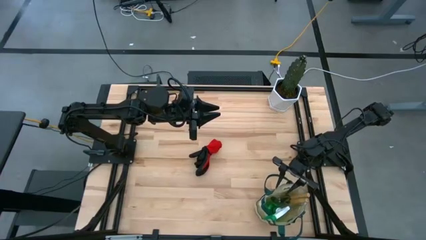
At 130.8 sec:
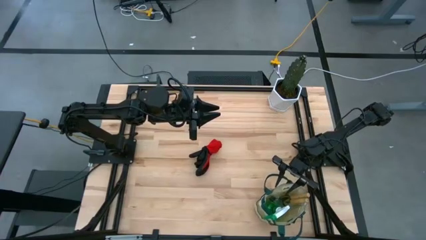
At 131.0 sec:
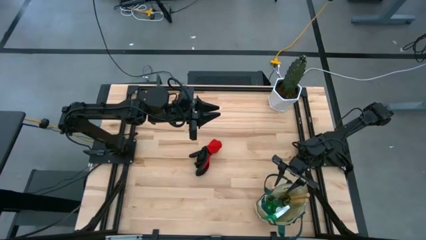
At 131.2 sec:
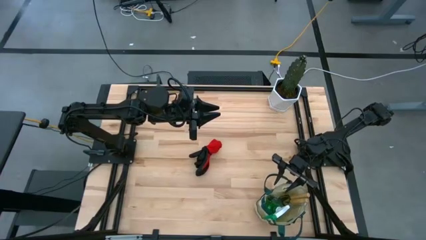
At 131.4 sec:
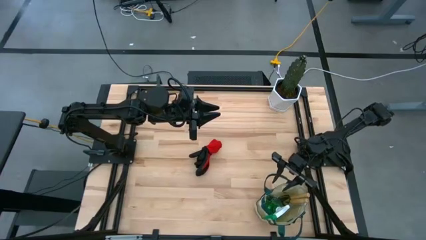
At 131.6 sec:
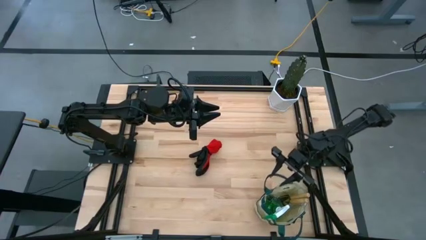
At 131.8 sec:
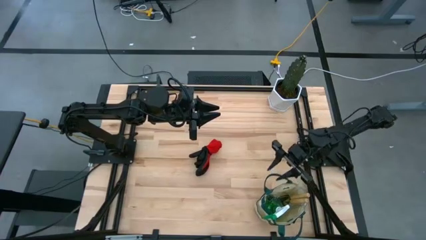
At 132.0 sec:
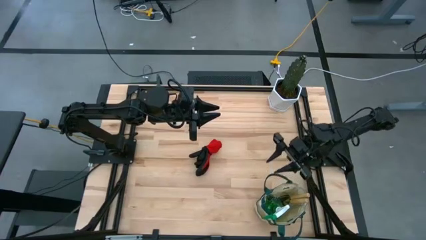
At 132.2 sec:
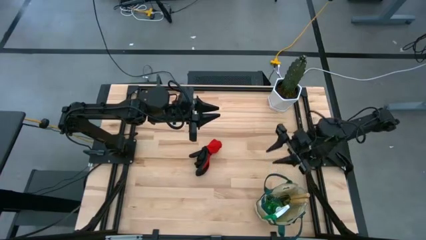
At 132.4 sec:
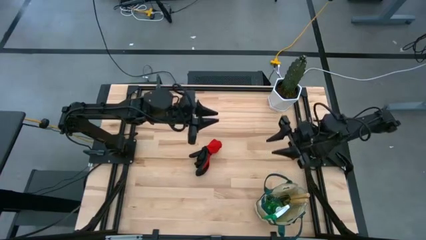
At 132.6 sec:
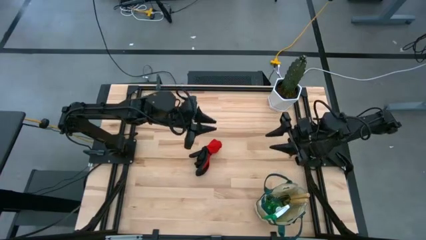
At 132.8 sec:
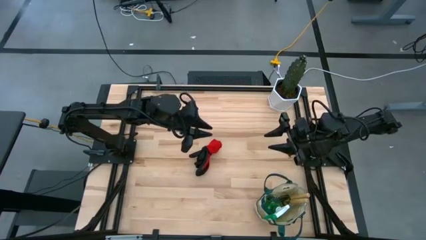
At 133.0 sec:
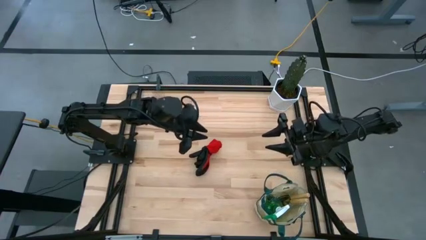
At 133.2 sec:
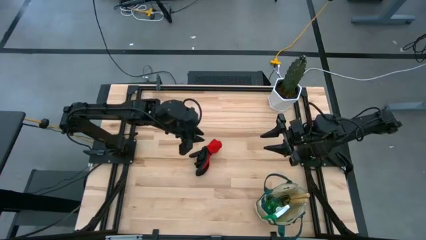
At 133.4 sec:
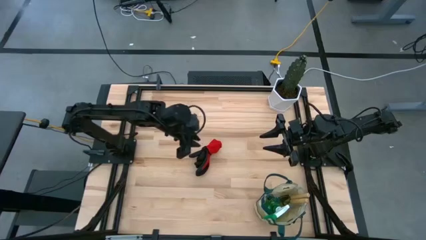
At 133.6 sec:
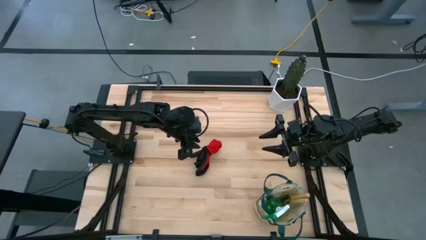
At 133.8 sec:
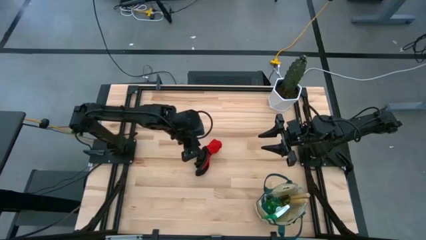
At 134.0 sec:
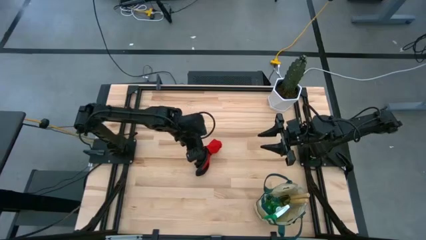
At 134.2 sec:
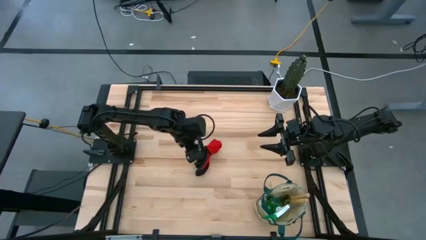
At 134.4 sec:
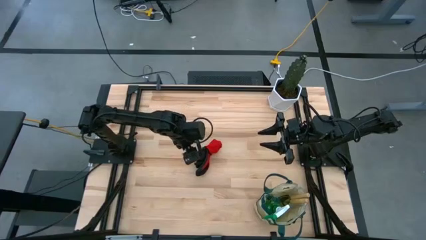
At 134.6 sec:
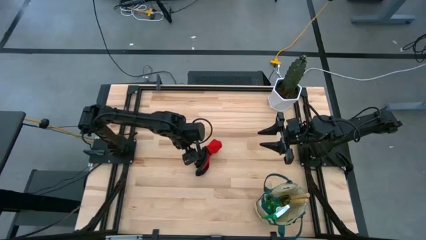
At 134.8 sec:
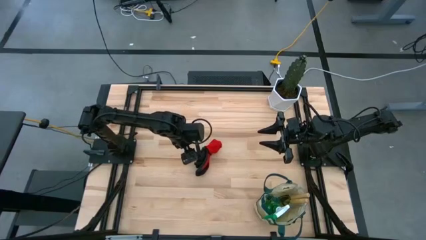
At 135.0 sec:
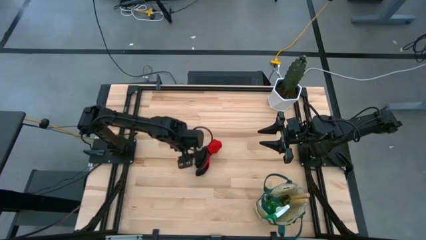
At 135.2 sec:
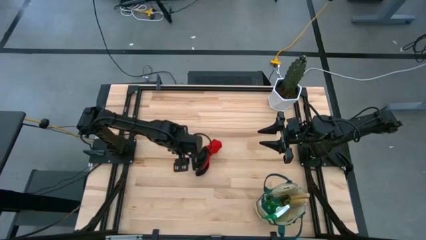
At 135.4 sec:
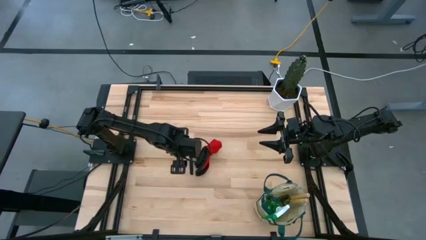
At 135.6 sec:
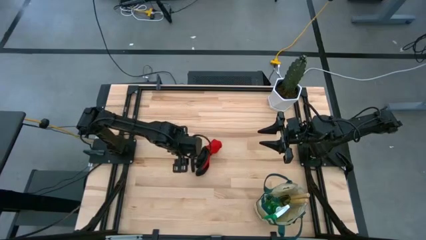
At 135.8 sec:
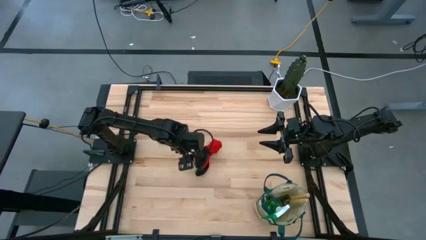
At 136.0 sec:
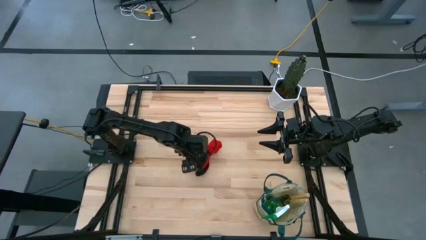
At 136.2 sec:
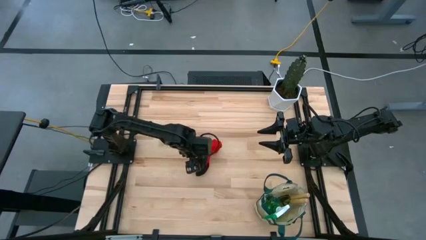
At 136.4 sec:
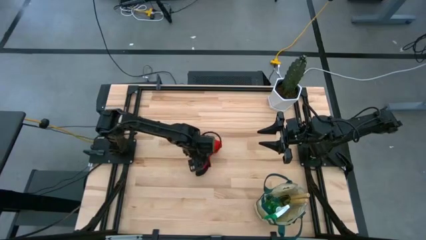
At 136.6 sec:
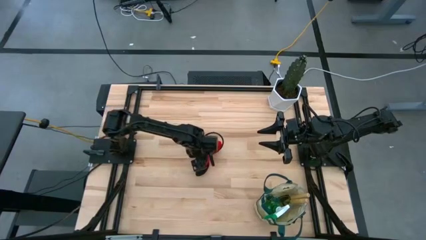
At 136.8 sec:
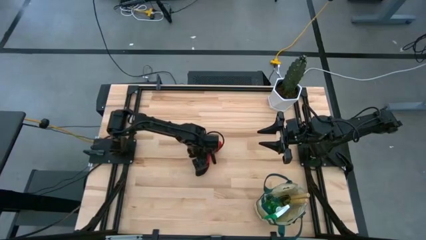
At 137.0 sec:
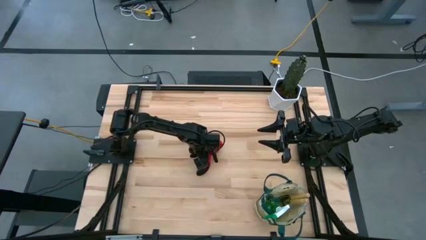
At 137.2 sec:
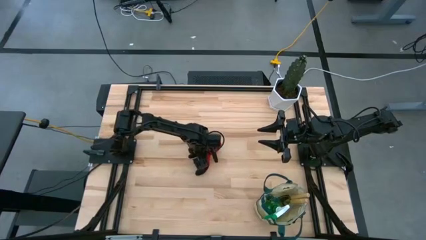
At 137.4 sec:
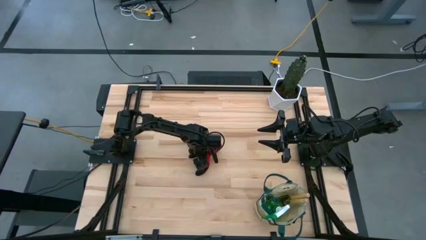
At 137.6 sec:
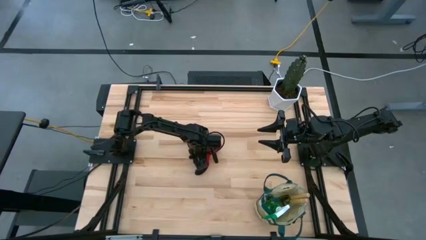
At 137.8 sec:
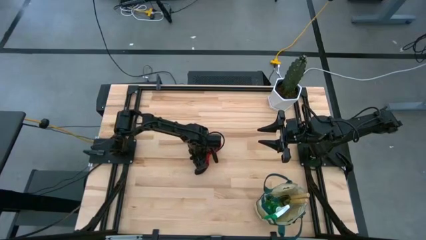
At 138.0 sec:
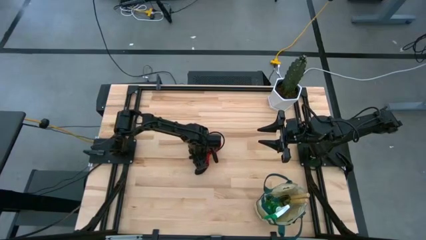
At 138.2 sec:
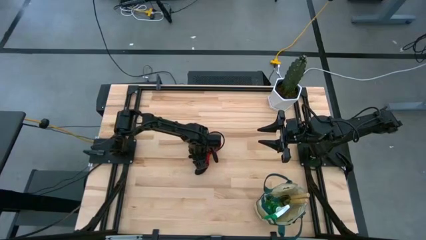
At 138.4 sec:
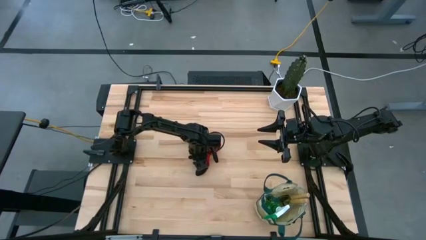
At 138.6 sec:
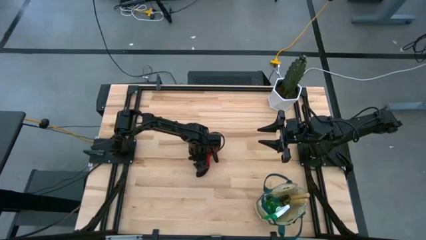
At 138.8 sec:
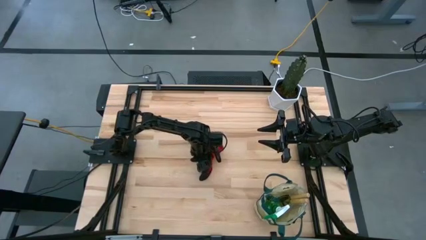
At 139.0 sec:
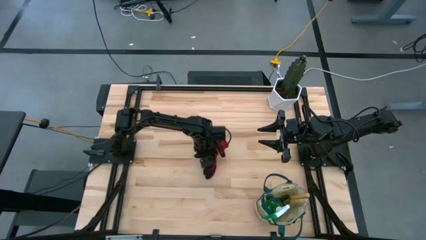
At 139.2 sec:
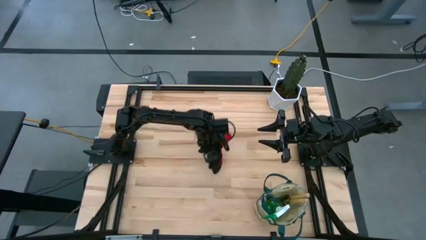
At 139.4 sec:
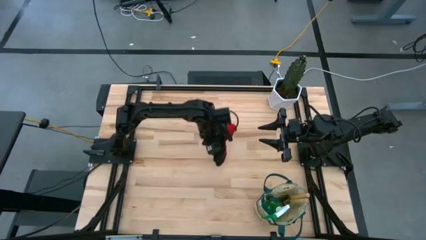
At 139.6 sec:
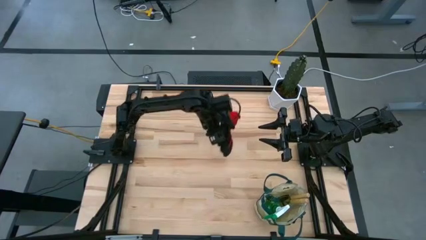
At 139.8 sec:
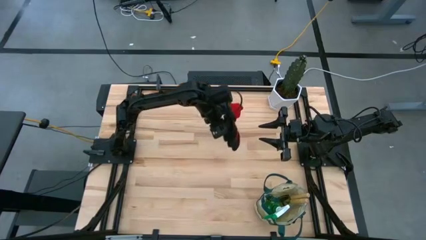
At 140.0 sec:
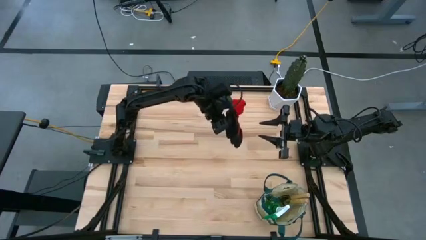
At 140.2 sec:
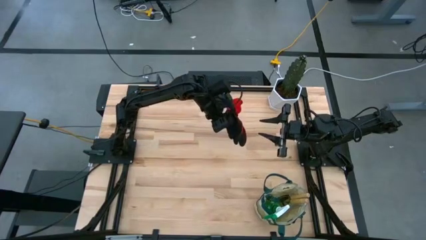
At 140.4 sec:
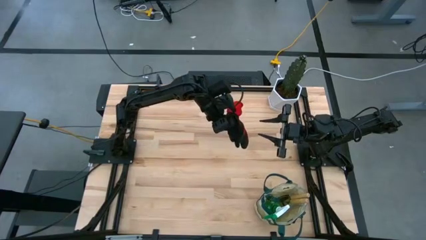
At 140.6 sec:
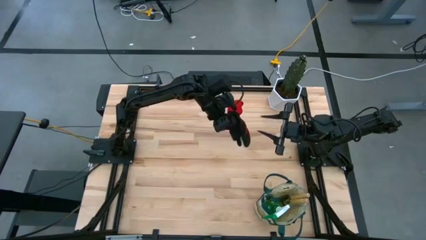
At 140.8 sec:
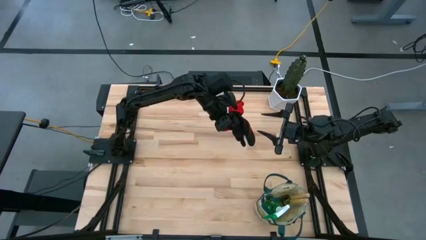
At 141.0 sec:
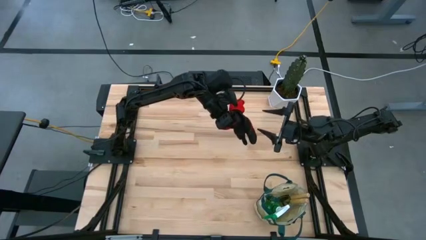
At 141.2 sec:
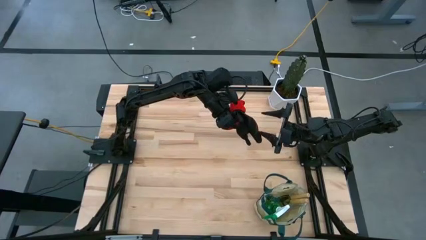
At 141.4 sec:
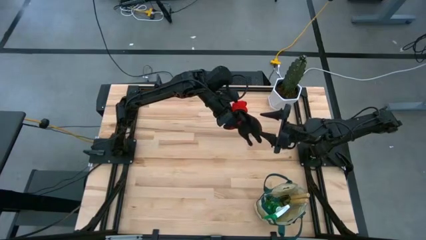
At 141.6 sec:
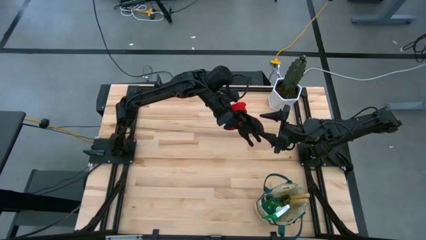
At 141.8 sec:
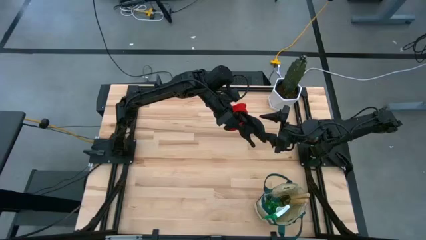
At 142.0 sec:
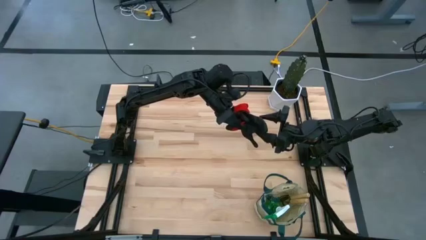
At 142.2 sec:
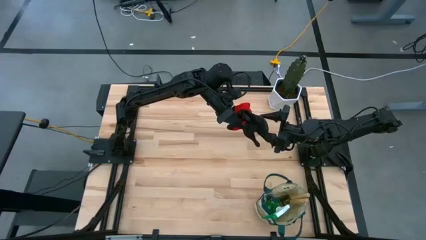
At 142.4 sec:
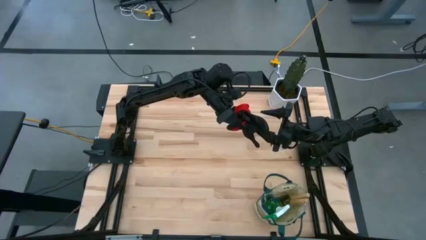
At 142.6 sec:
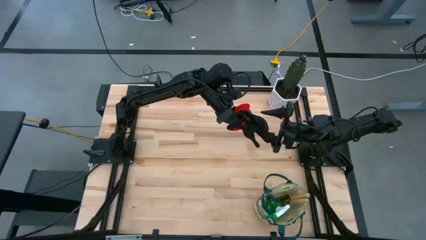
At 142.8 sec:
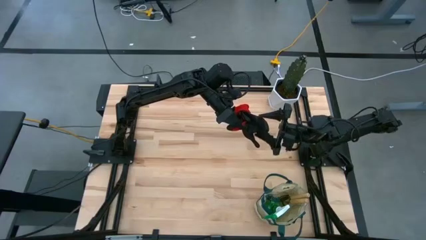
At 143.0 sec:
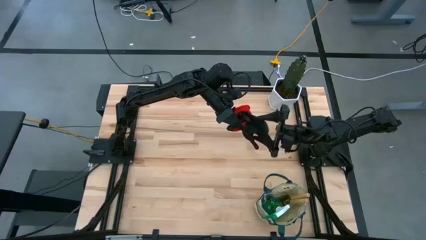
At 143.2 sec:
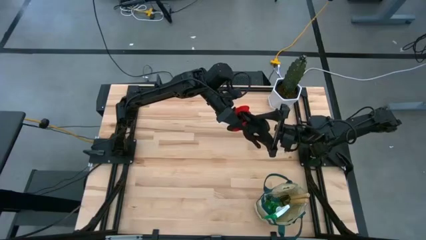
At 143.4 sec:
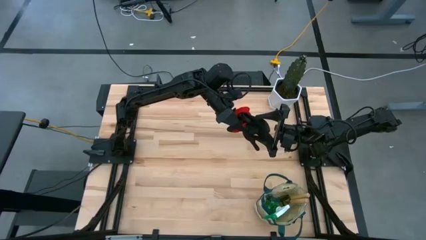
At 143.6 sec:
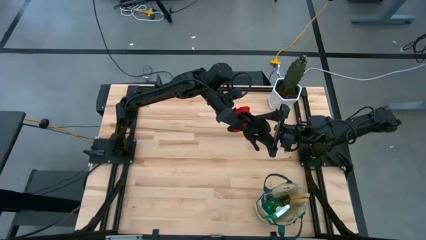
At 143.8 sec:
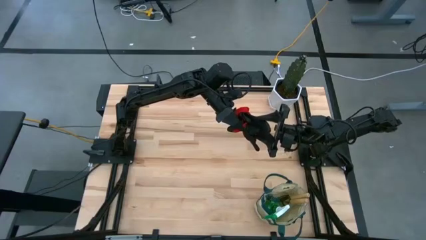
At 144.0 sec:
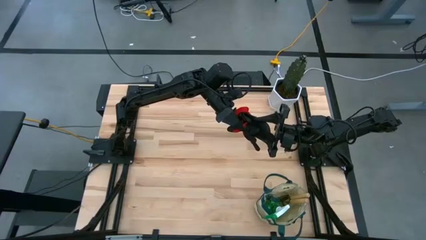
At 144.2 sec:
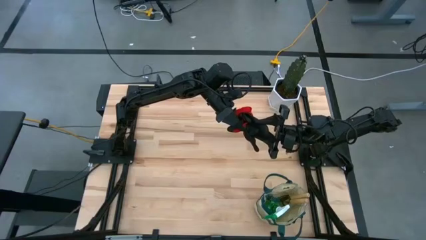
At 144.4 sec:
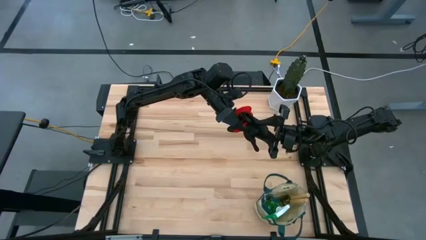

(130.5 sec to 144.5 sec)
Task: Pick & Place Garden tools in Gardening bag
Put the red gloves into the gardening tool bag

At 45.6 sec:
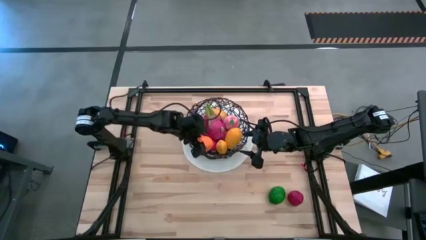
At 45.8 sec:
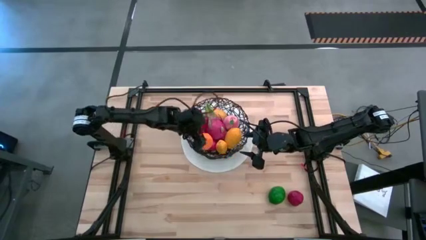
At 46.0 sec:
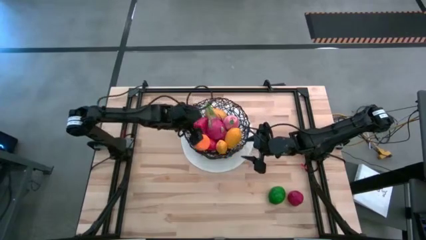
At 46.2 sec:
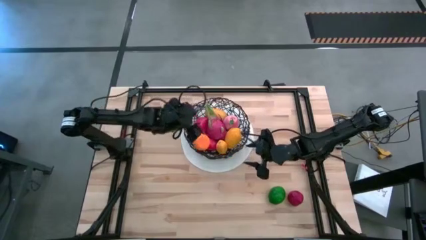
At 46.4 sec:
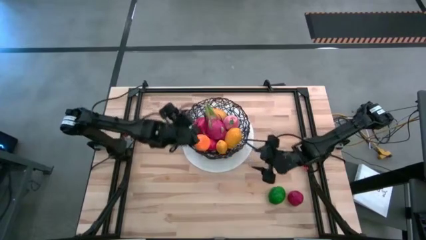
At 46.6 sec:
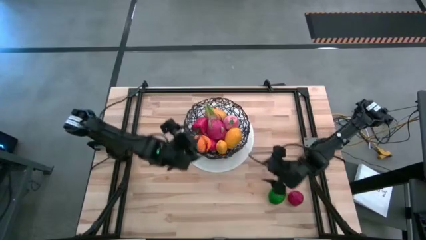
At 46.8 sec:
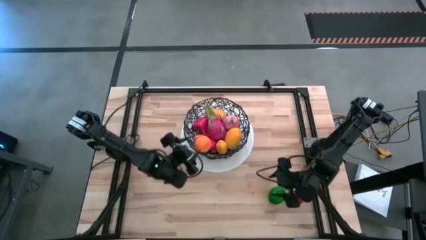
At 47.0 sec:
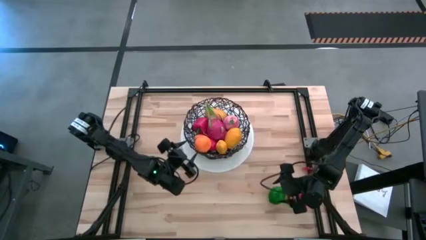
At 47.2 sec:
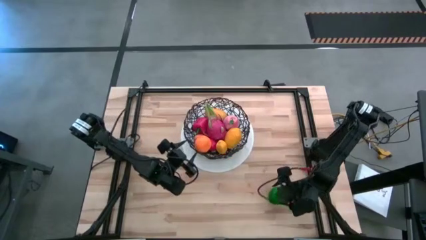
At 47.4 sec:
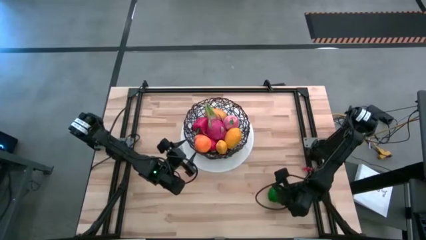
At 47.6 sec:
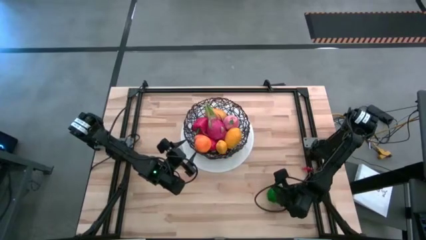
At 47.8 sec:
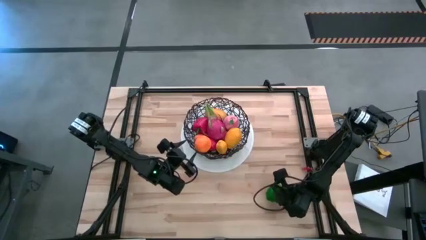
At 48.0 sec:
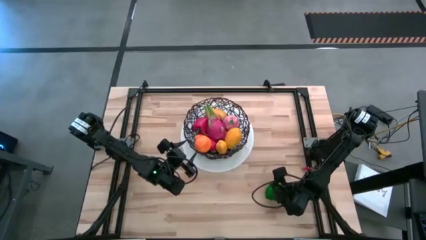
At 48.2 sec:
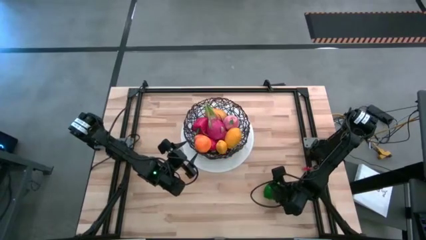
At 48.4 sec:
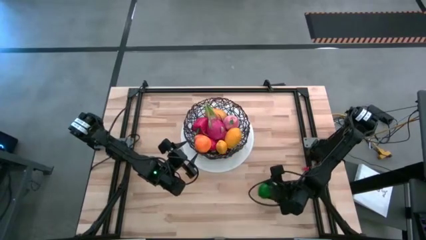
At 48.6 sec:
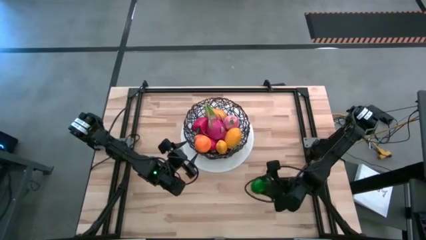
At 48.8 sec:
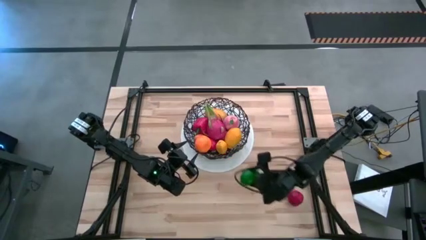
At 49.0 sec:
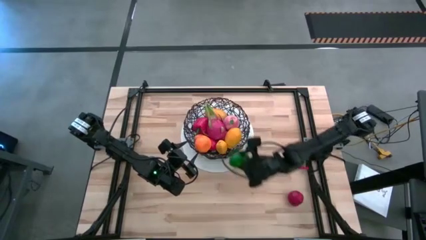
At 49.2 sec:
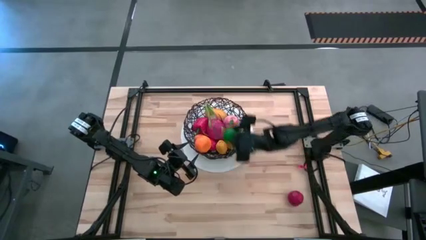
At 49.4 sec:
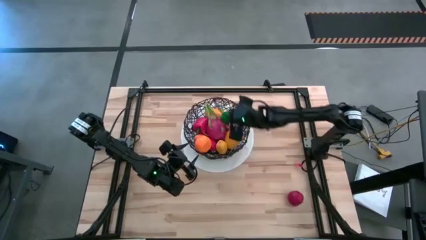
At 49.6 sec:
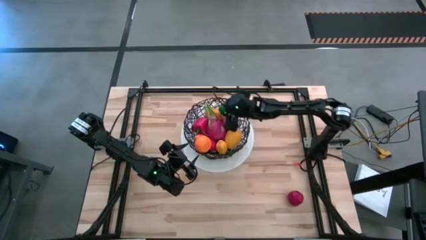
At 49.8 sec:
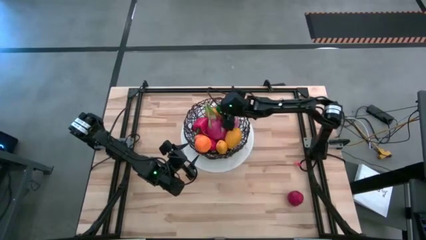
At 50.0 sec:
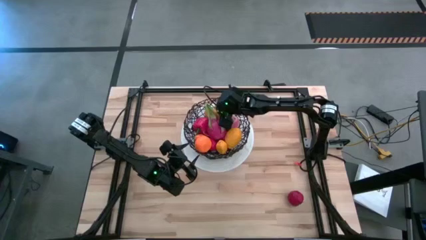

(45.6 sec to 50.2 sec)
Task: Build produce basket
Put the lime into the wire basket
